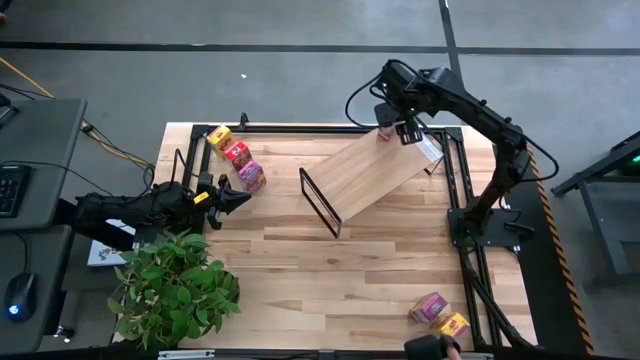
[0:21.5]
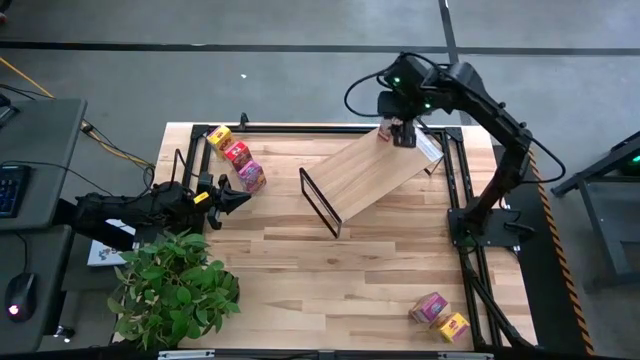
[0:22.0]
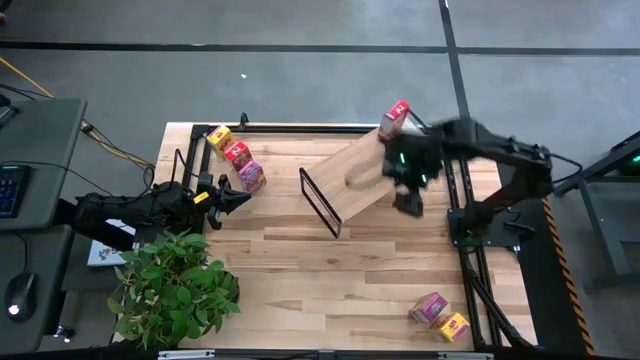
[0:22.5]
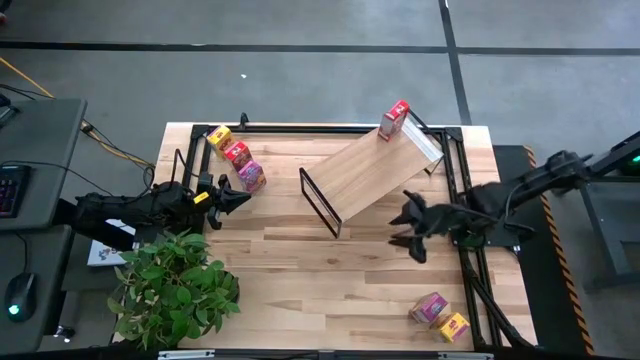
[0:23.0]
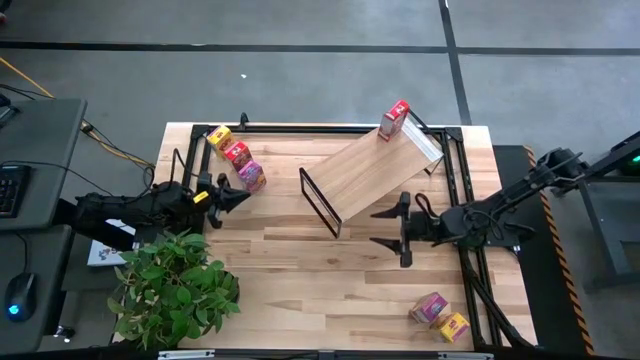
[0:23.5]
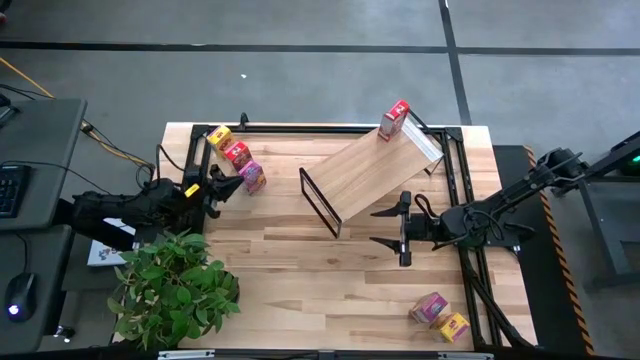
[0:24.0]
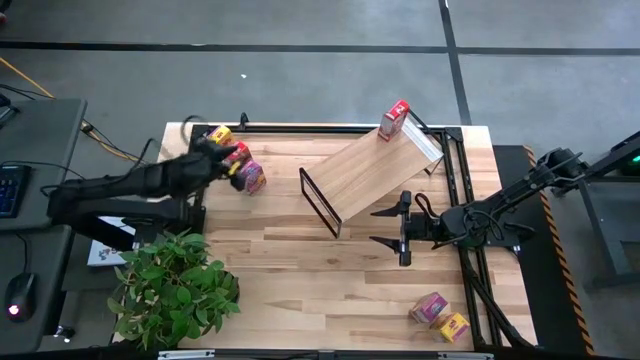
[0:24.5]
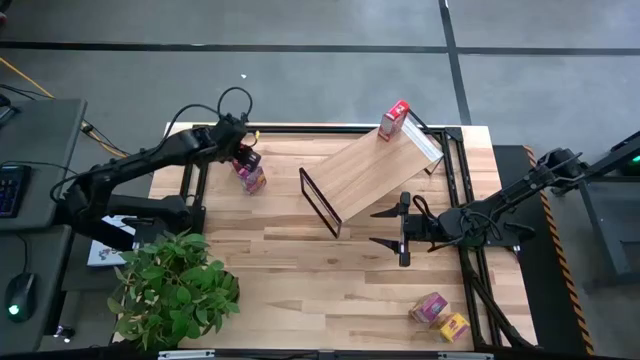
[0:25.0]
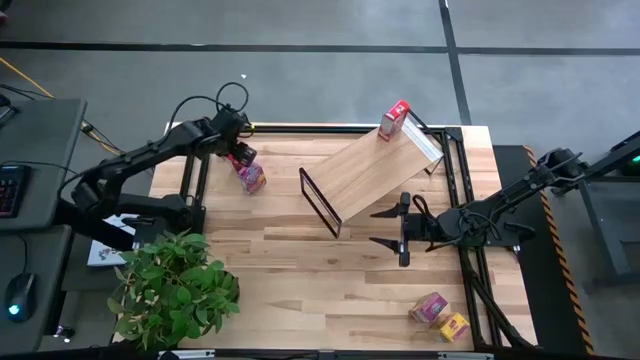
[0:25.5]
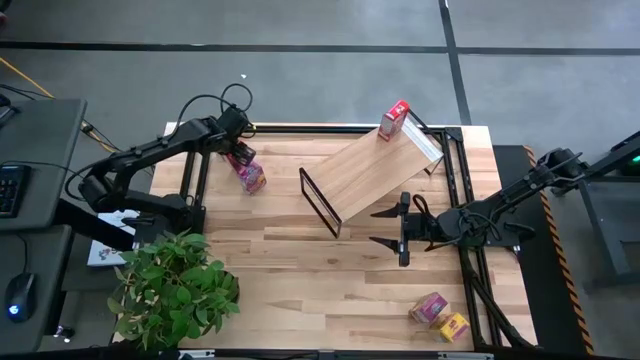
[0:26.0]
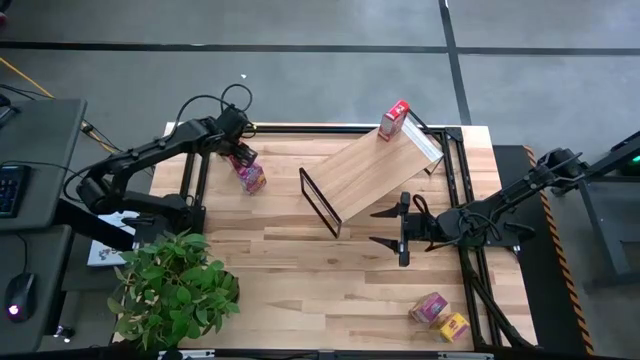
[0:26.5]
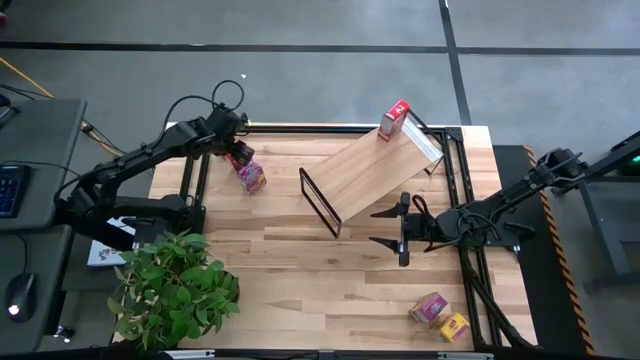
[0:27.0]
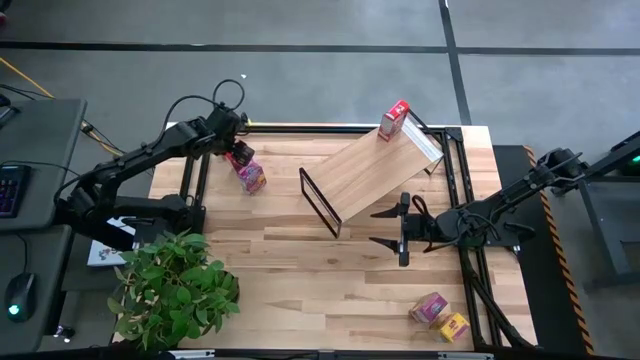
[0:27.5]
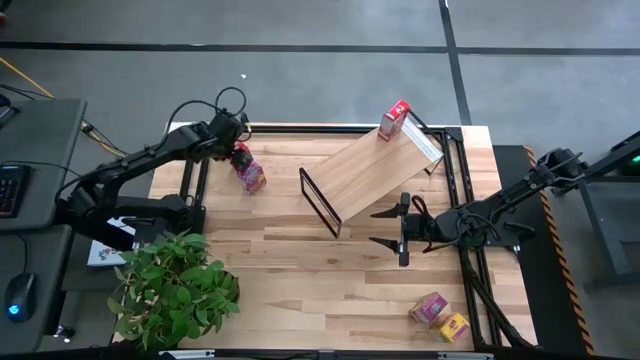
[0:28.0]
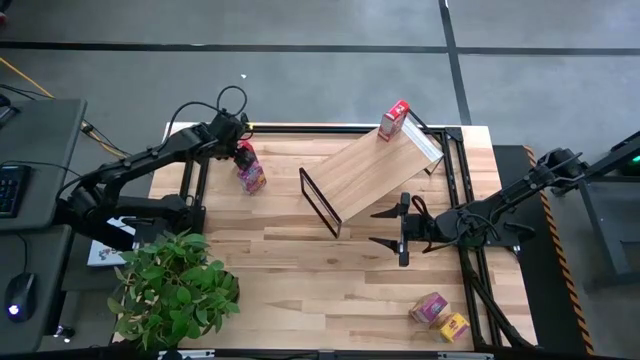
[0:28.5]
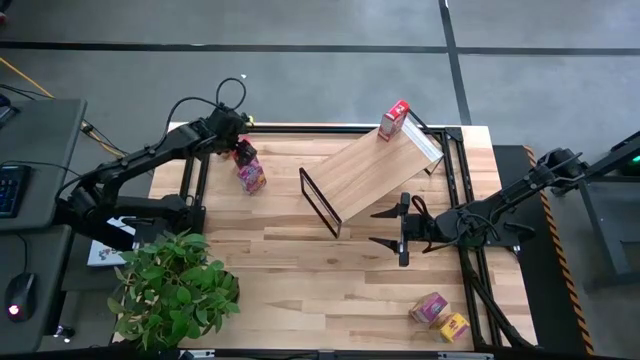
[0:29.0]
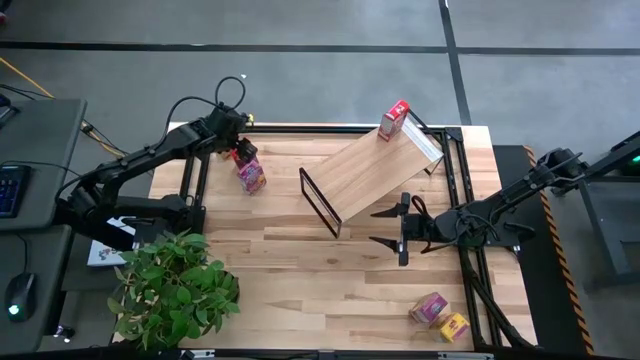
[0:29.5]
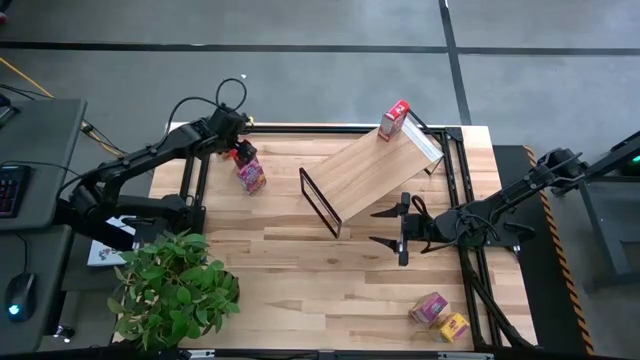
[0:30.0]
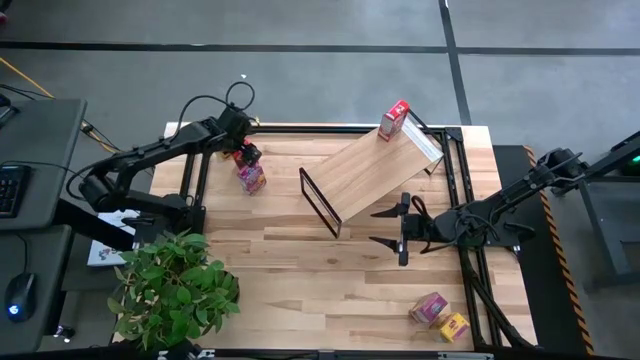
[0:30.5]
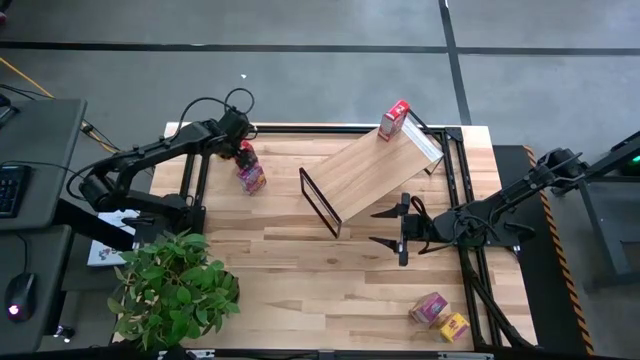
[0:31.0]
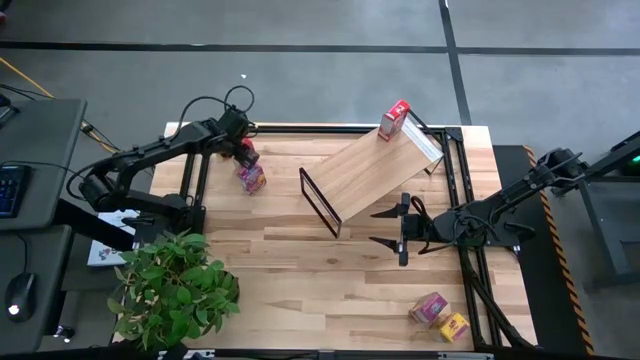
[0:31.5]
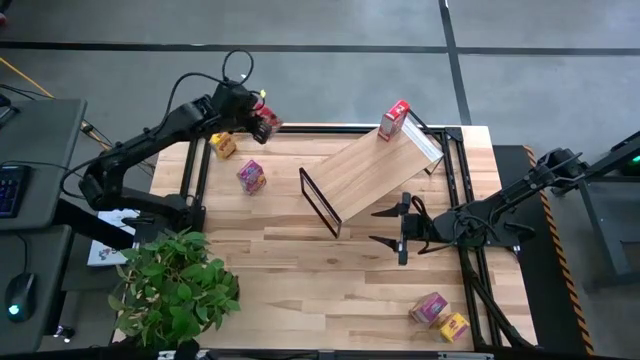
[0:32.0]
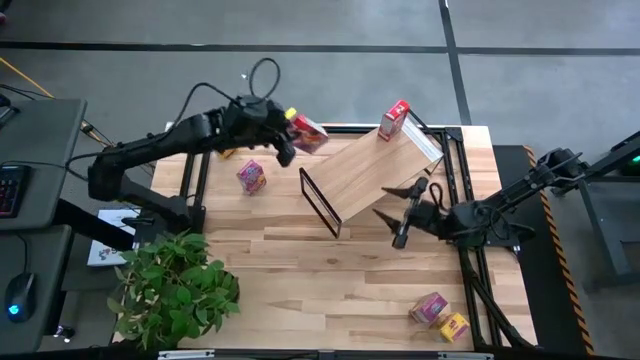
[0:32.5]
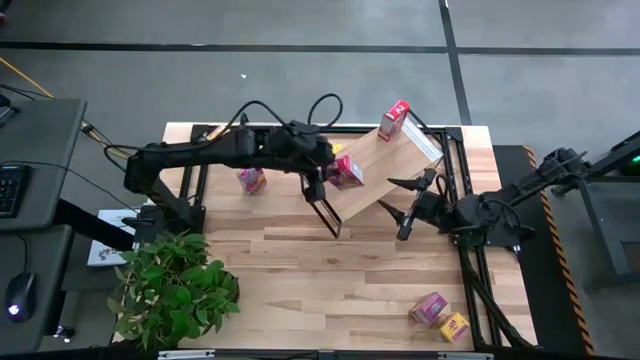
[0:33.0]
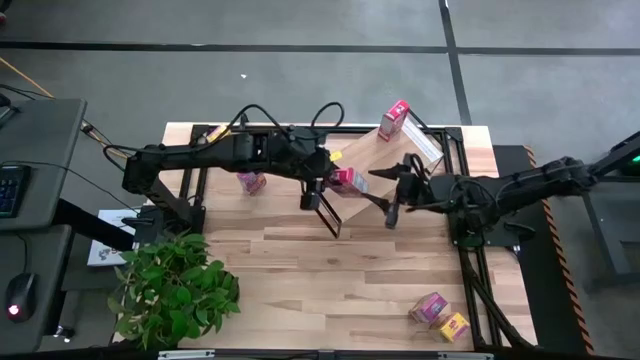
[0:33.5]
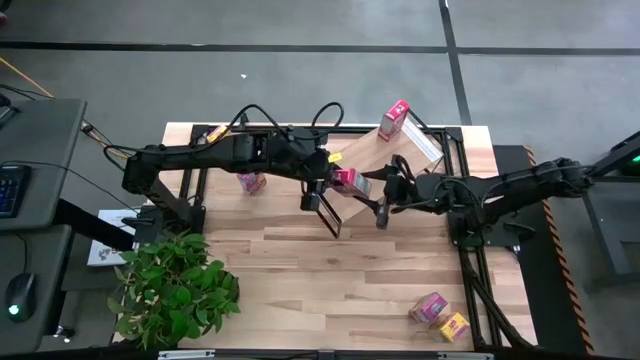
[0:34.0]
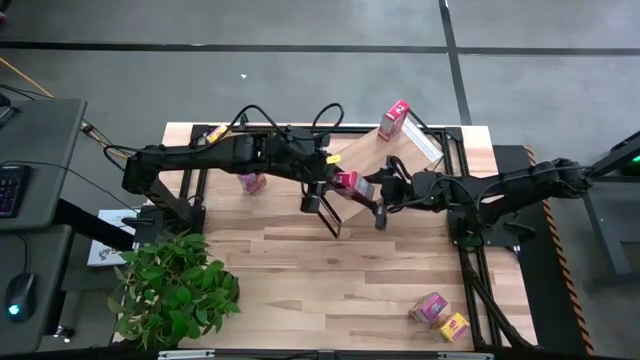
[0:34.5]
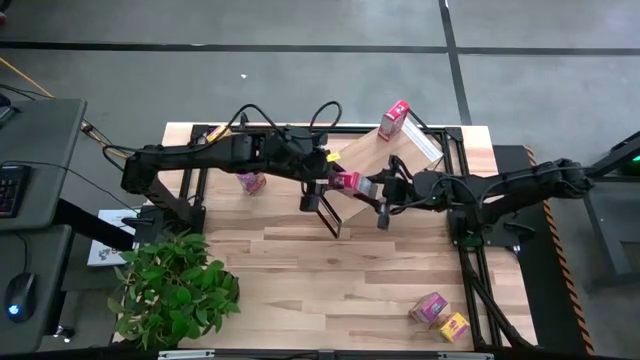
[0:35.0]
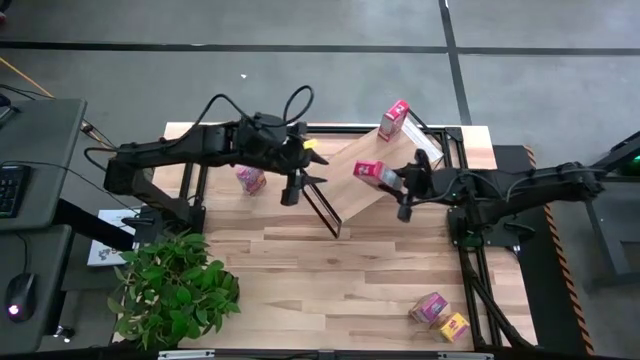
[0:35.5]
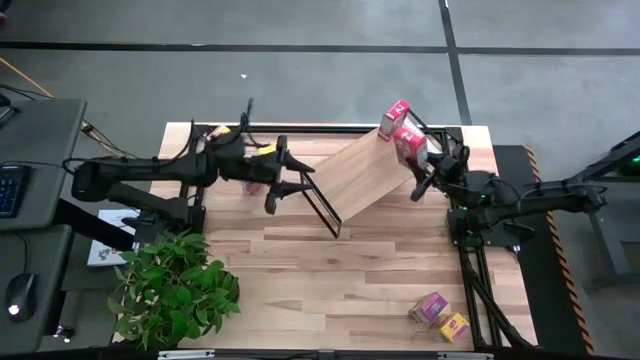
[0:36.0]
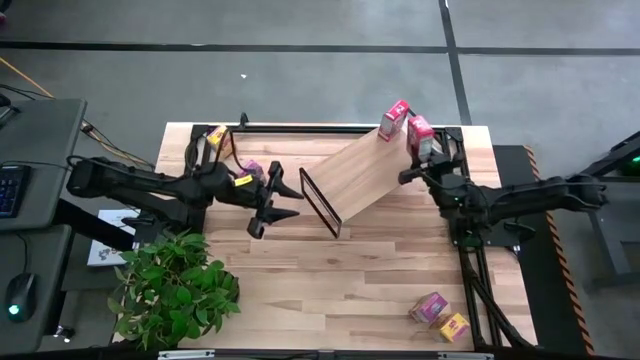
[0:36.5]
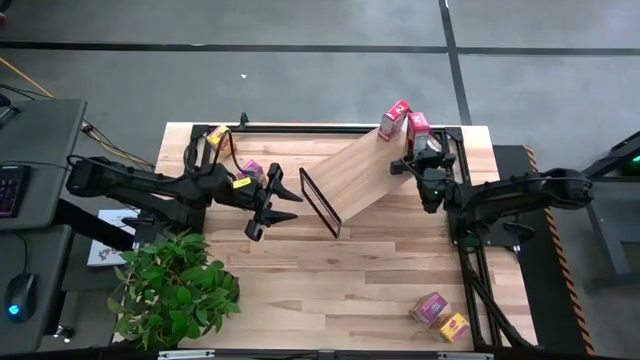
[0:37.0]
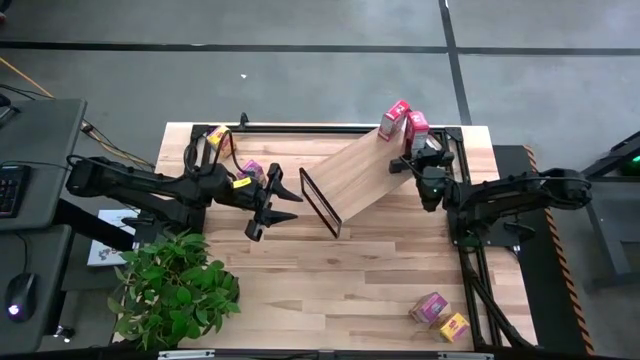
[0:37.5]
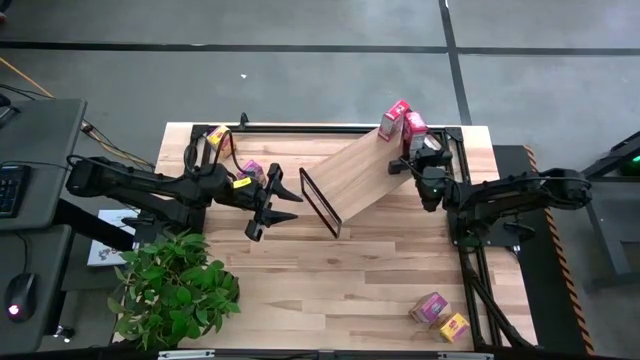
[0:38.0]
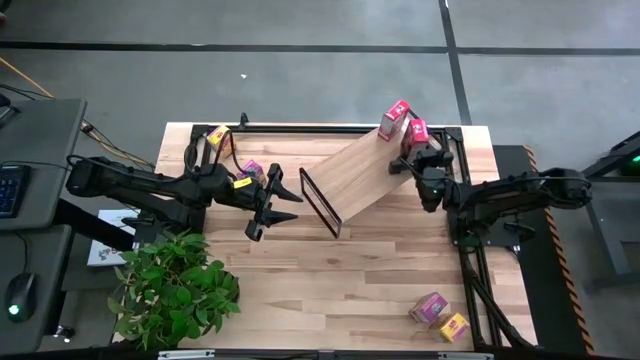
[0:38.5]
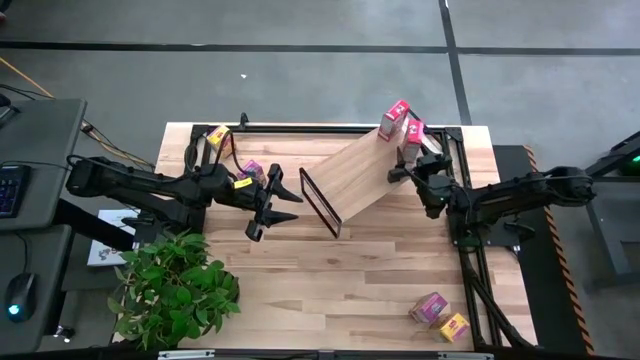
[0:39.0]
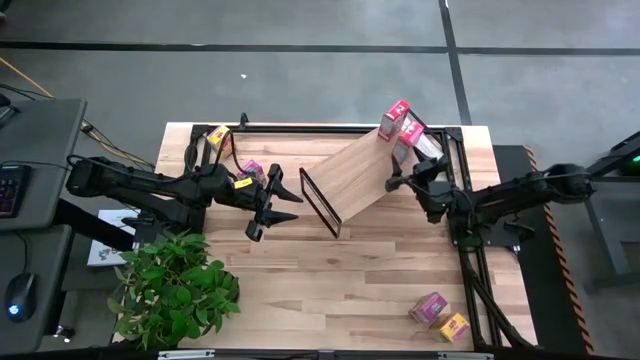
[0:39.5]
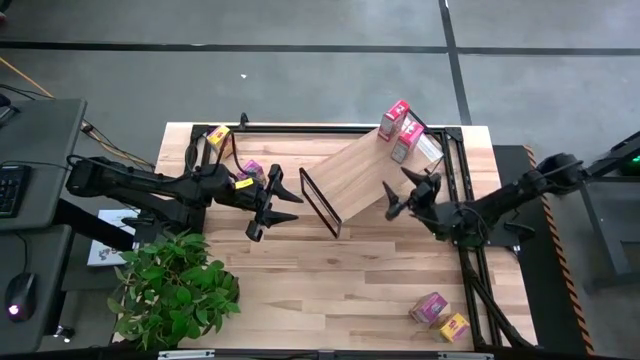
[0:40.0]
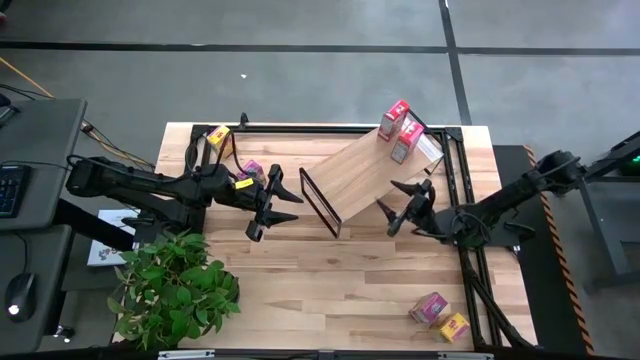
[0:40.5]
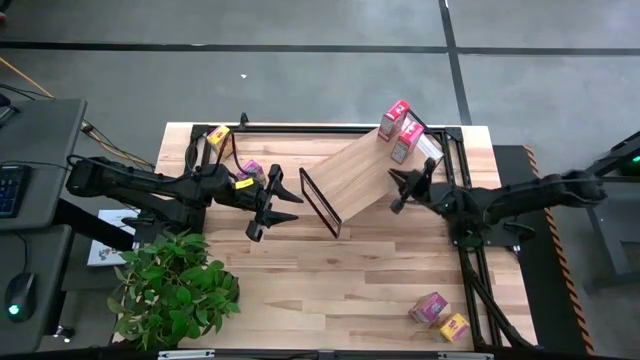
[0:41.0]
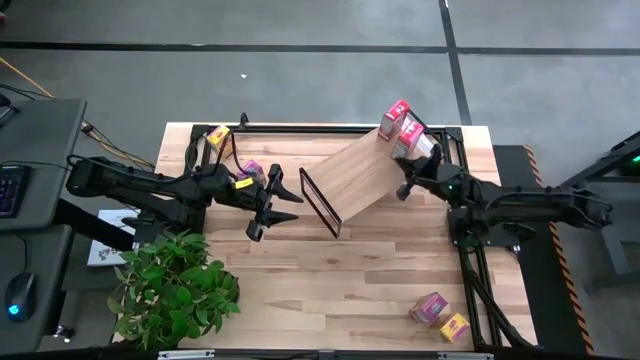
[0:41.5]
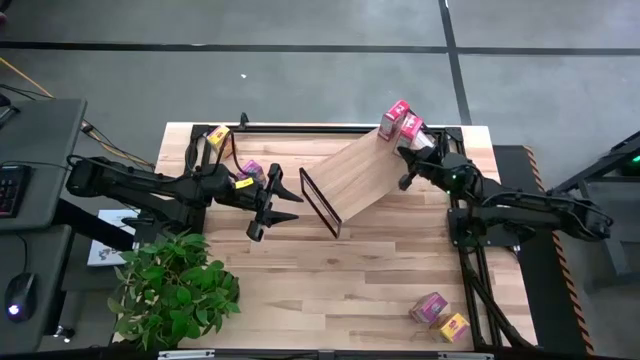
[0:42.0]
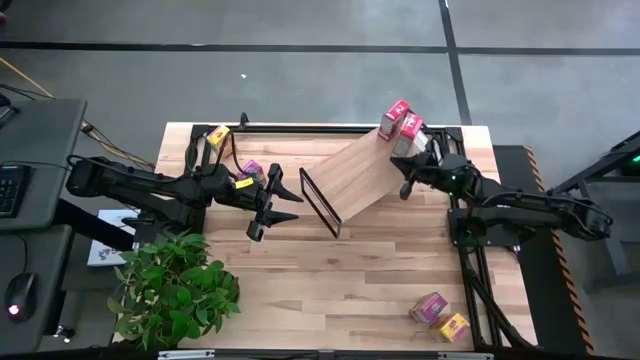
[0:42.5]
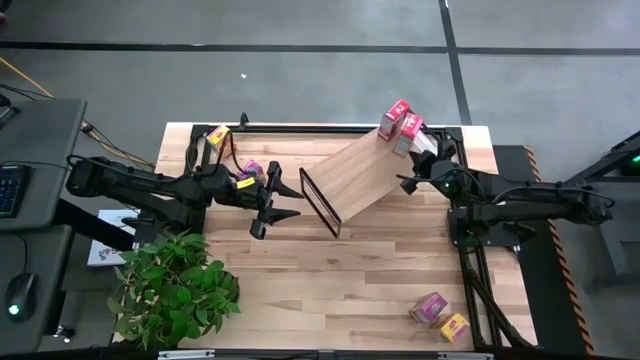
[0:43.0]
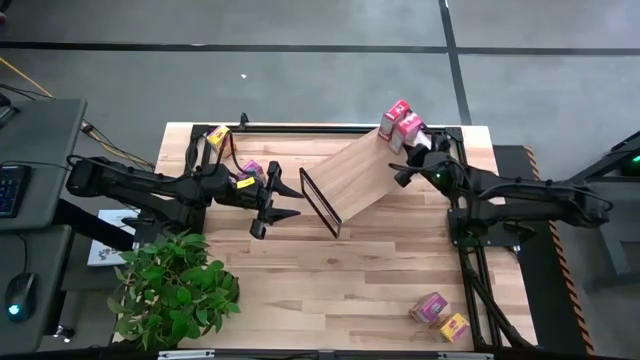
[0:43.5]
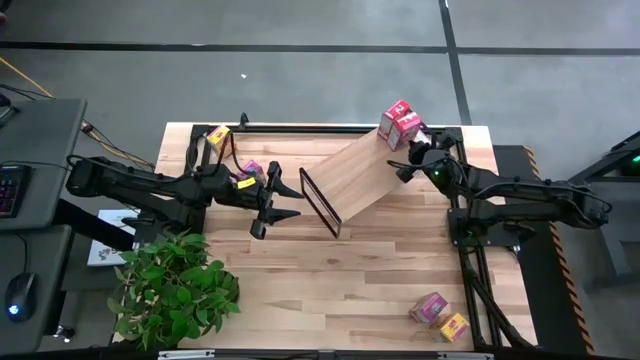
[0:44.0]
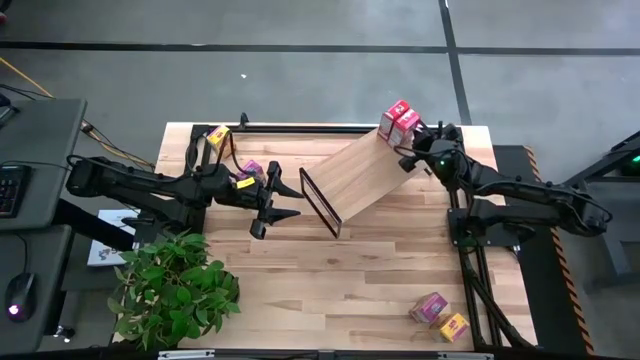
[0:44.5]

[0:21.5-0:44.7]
Task: Stack cereal on shelf
Put the red cereal box on the shelf aligned with the other red cereal box
